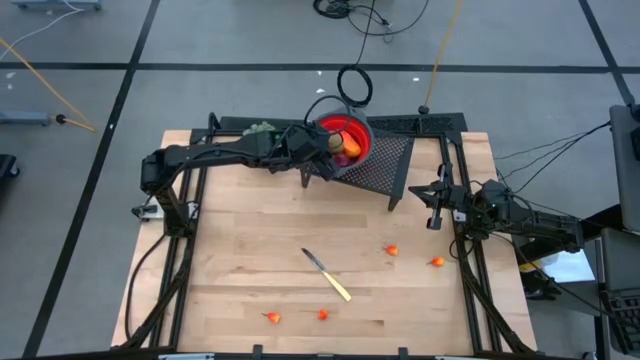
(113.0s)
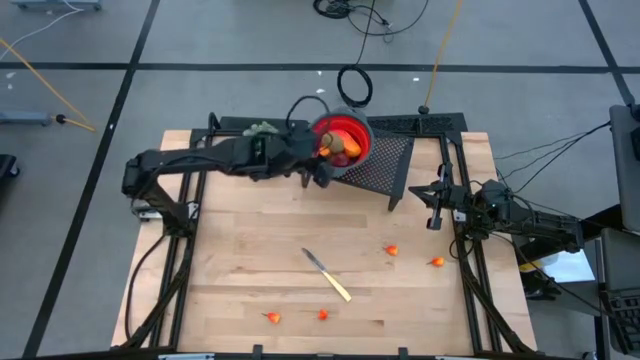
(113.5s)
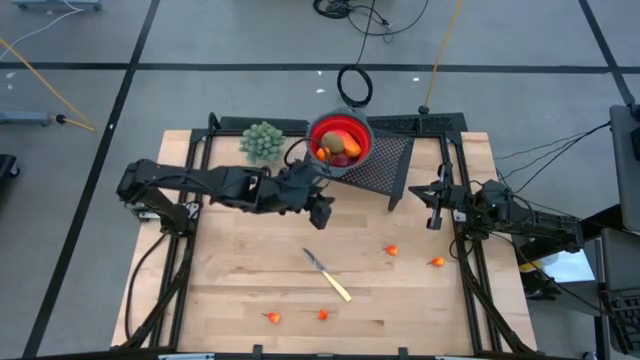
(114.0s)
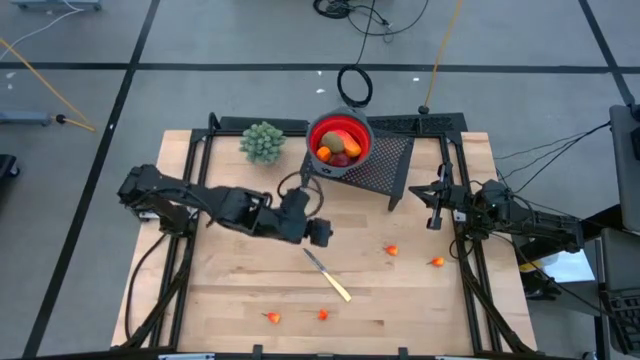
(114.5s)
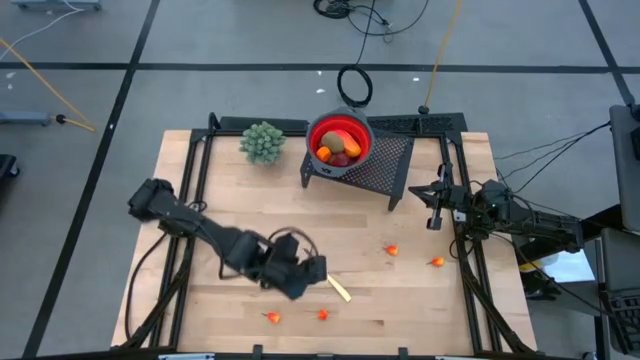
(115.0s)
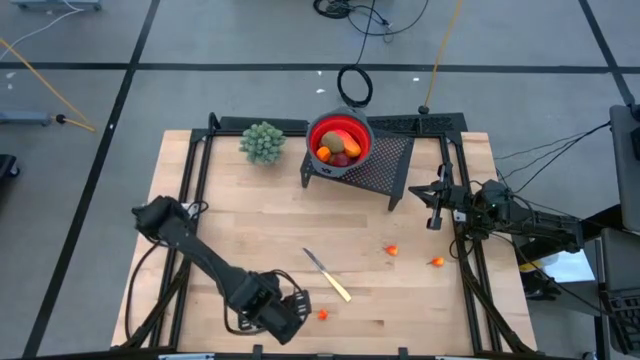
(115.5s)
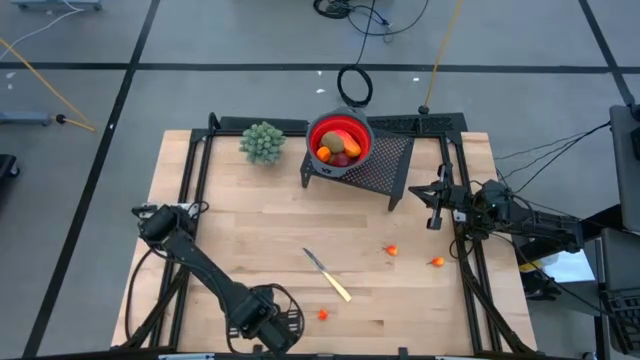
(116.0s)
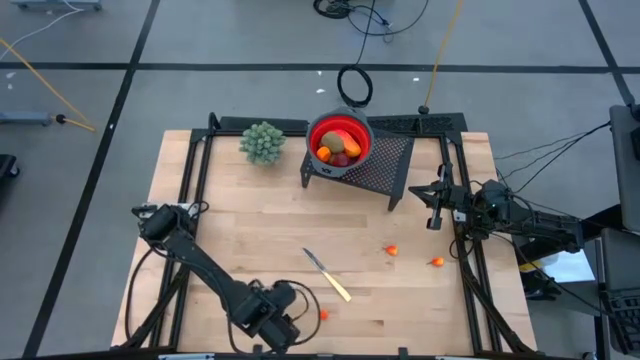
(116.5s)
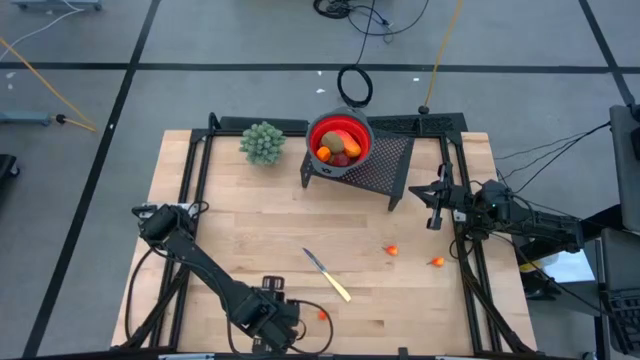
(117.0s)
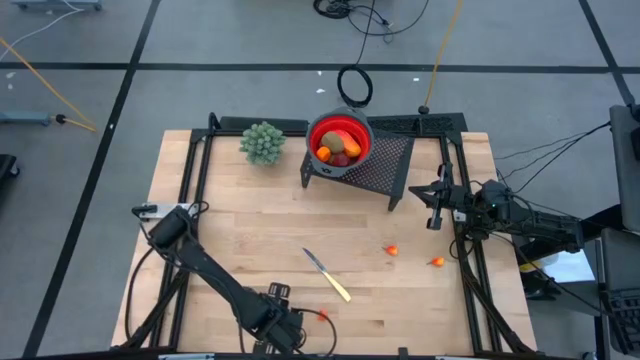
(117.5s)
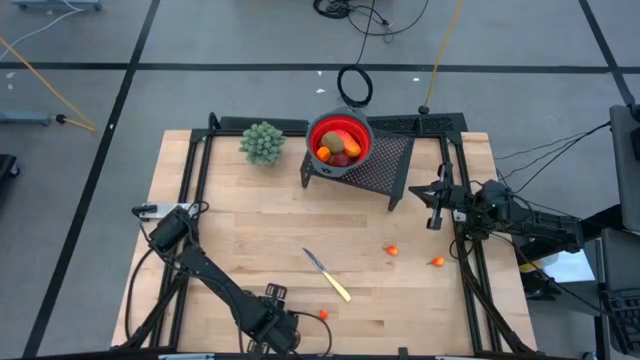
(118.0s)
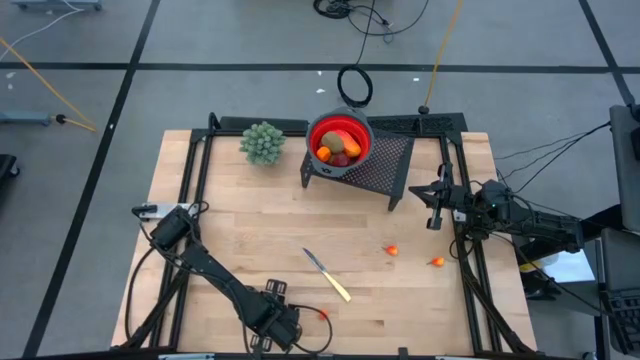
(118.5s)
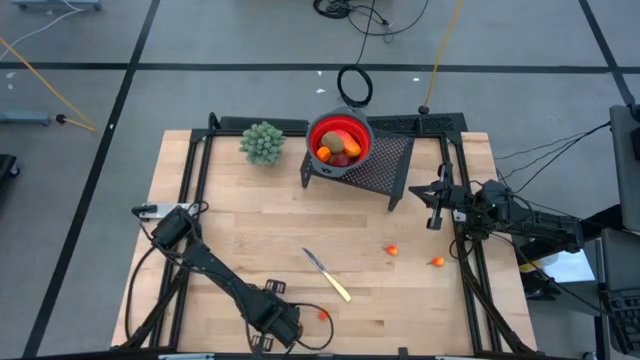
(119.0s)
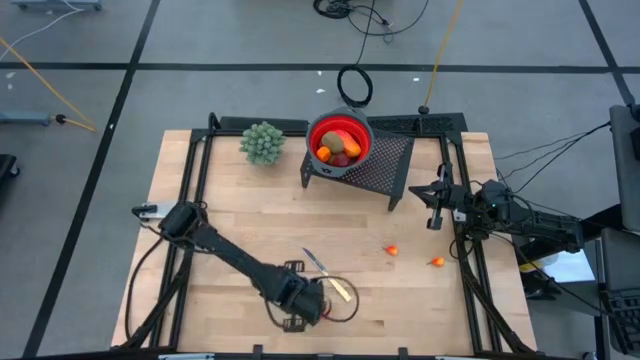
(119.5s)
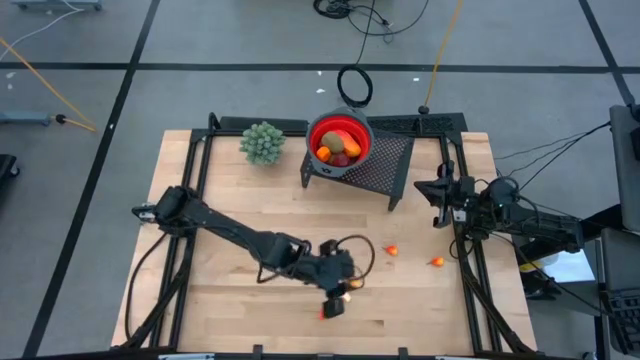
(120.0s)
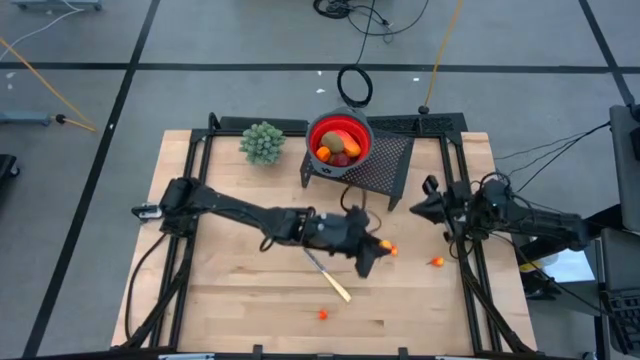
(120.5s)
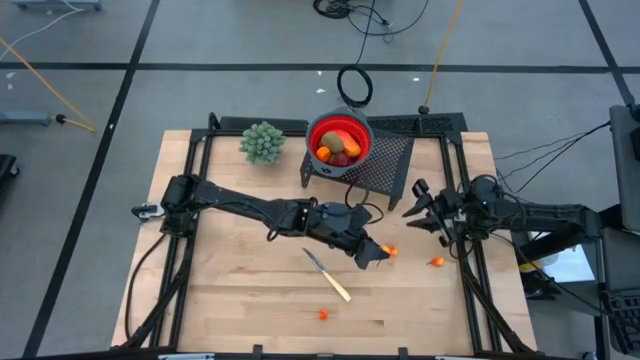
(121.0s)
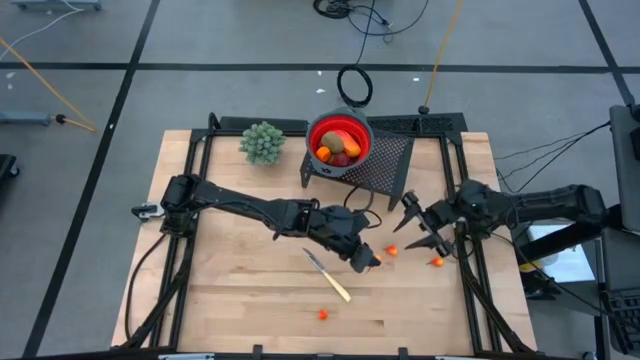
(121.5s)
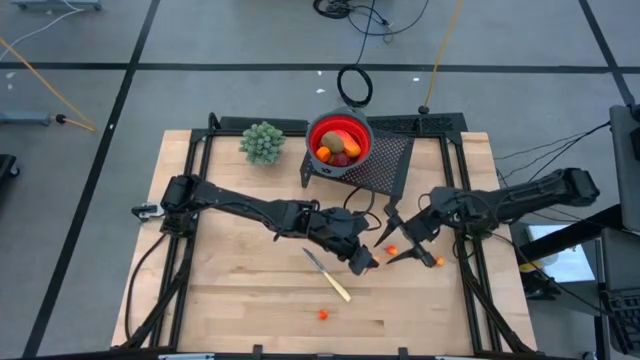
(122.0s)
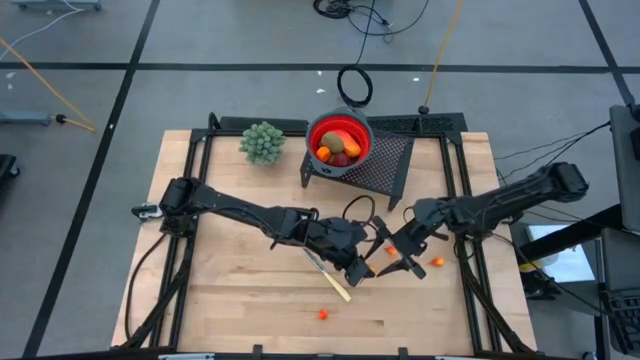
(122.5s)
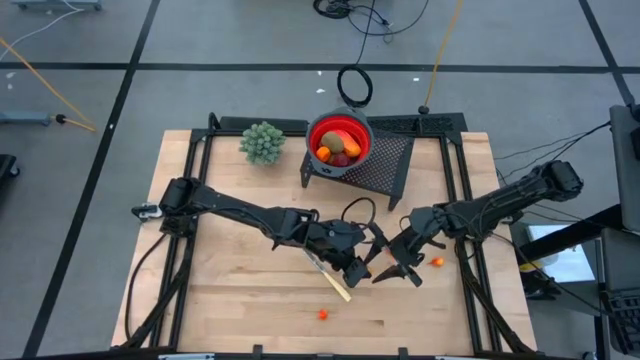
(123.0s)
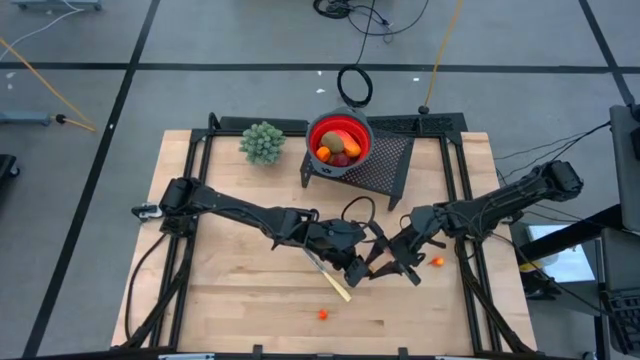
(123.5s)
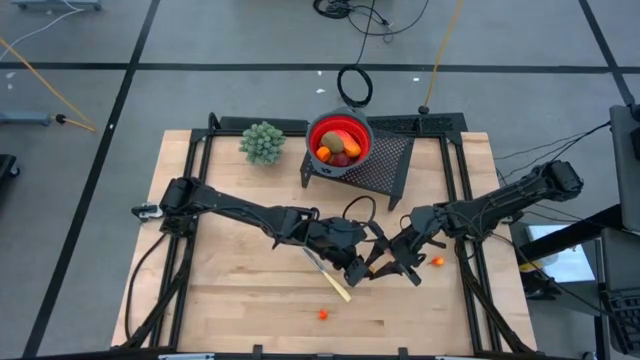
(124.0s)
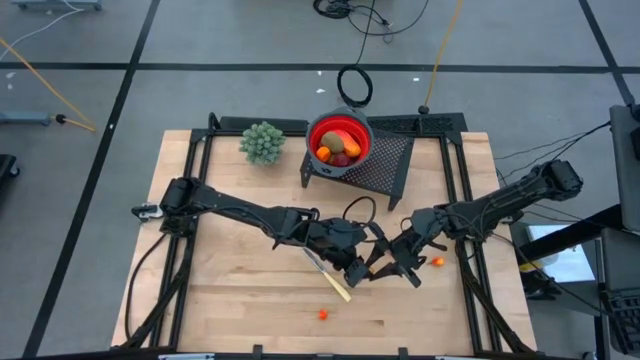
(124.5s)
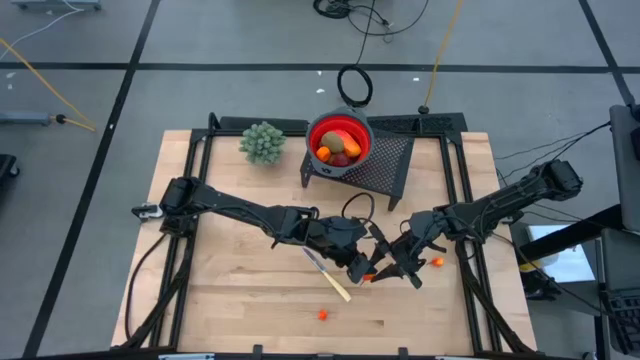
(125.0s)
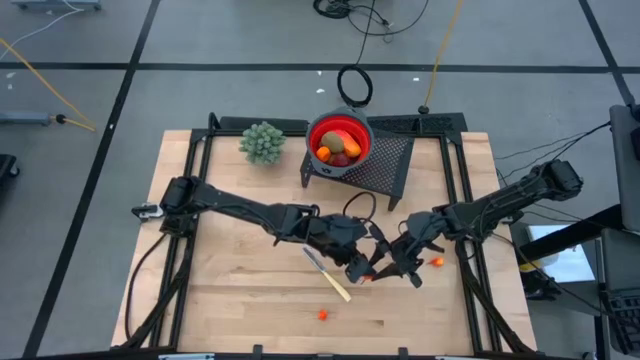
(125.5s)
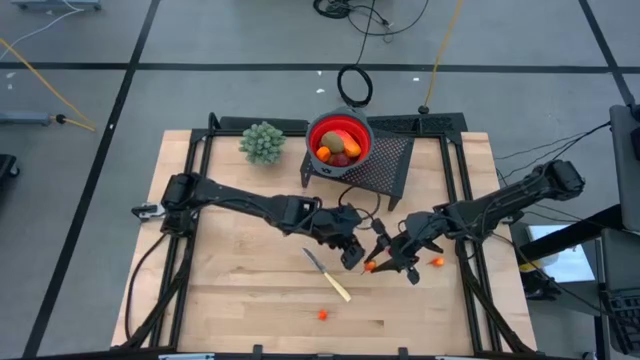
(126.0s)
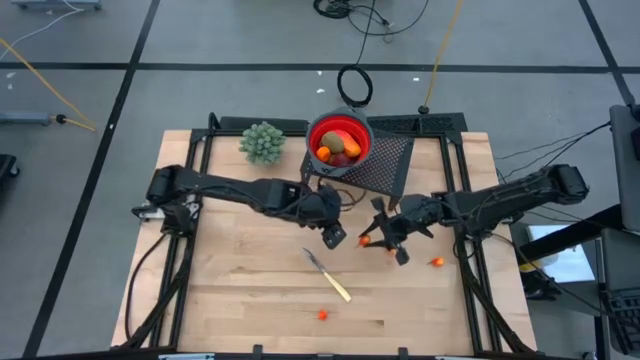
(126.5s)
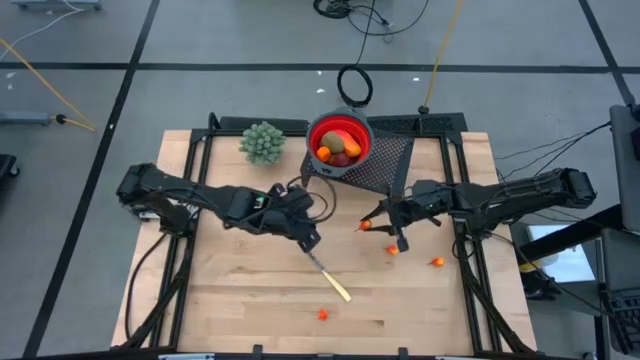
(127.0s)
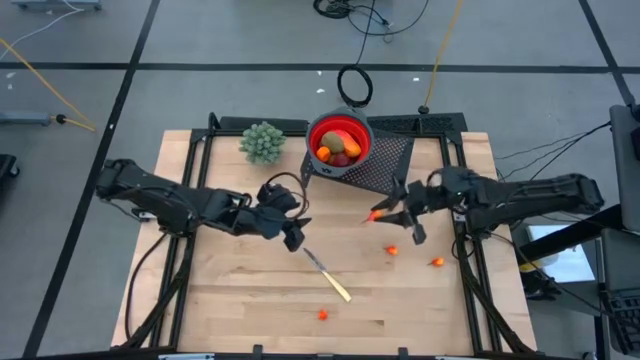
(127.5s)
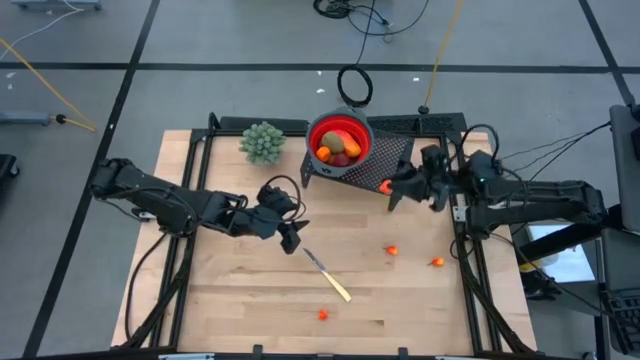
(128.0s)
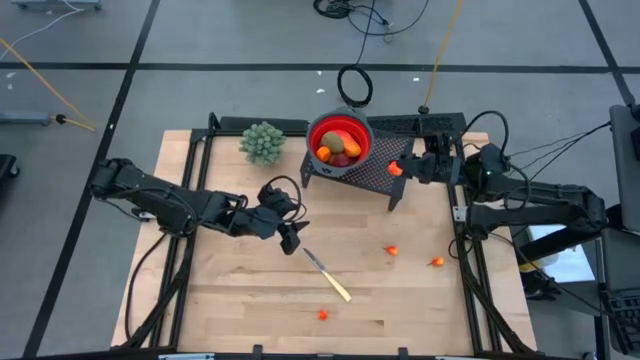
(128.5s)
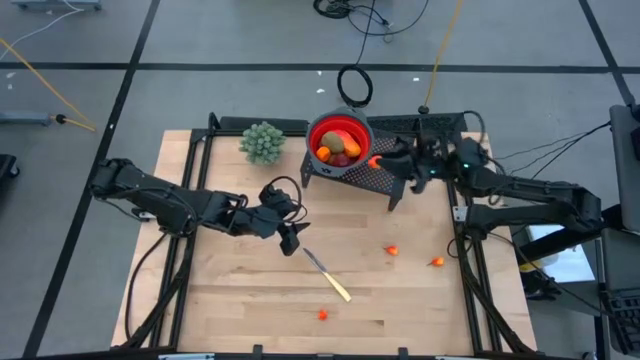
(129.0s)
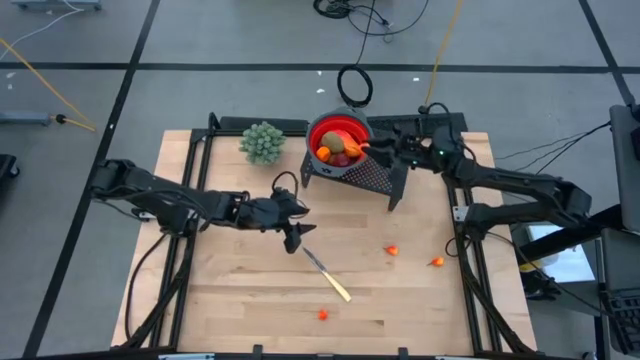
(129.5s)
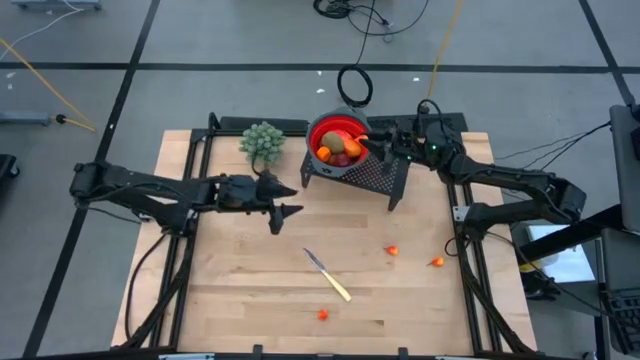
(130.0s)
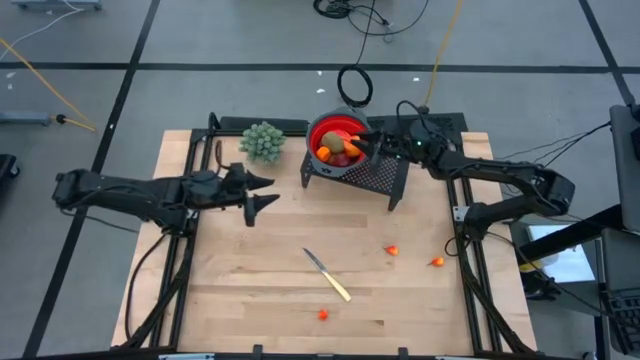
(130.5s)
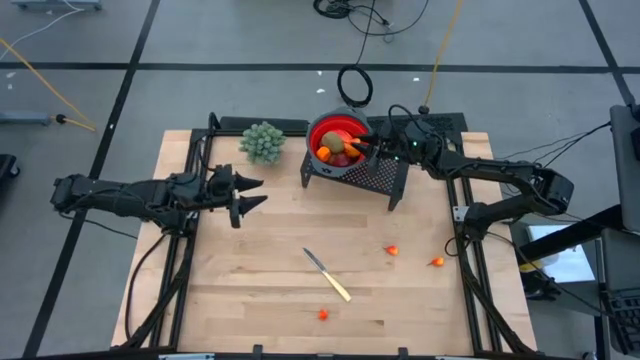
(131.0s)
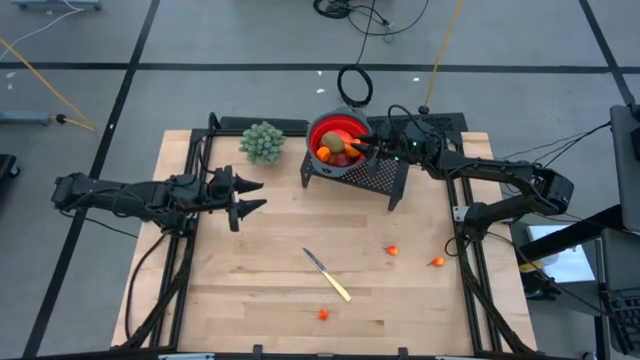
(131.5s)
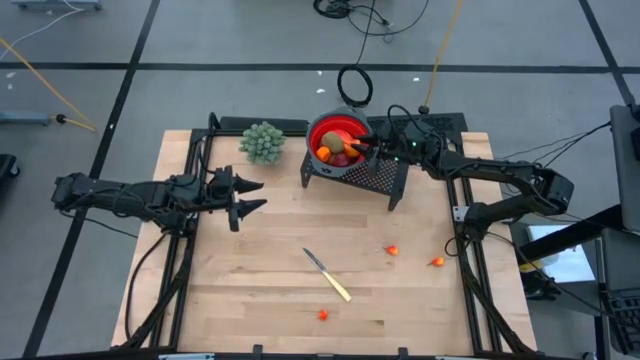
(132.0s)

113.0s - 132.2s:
Task: Pick & Place Fruit
Put the yellow pear into the red strainer bowl on the shelf

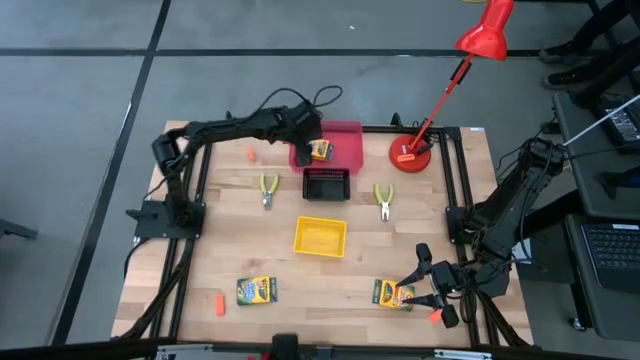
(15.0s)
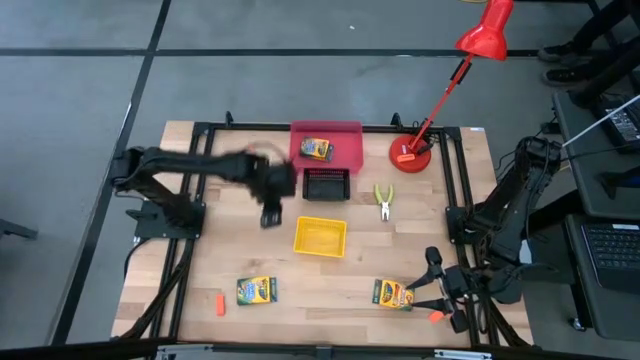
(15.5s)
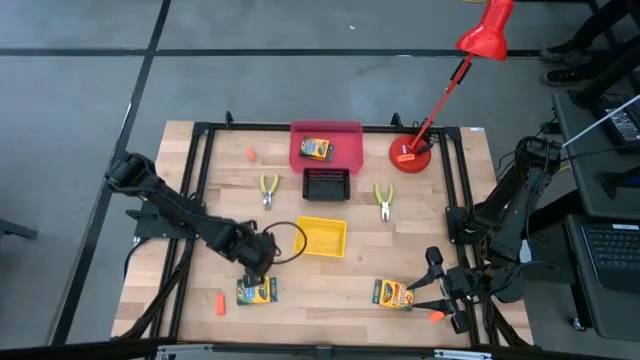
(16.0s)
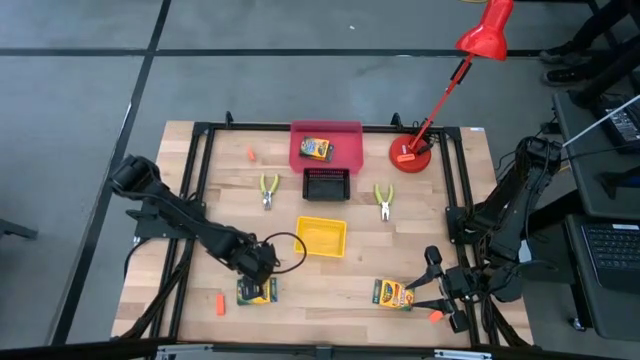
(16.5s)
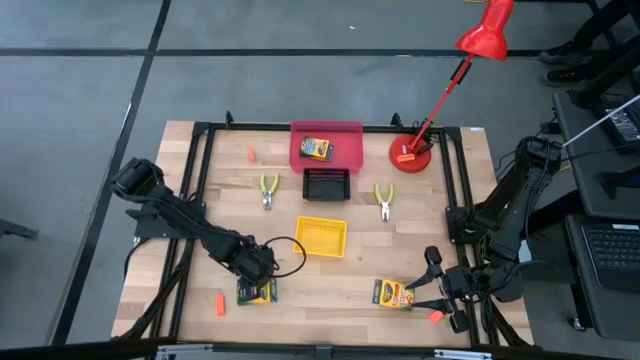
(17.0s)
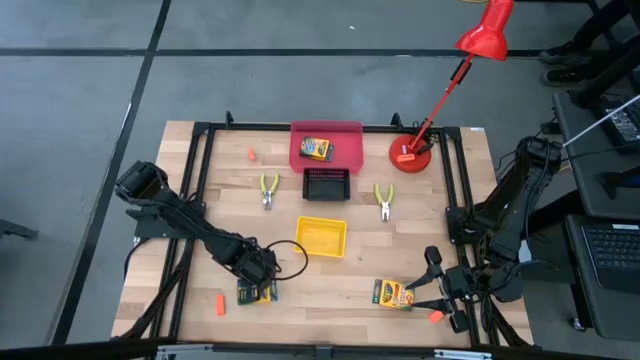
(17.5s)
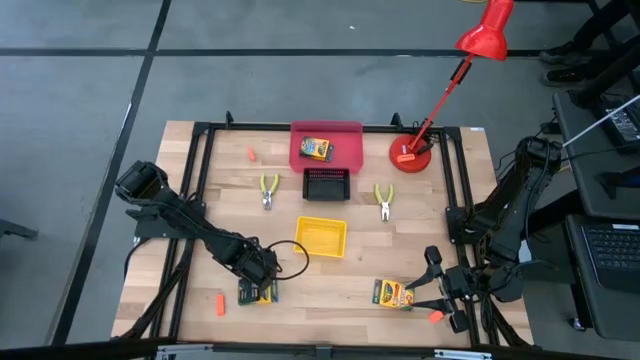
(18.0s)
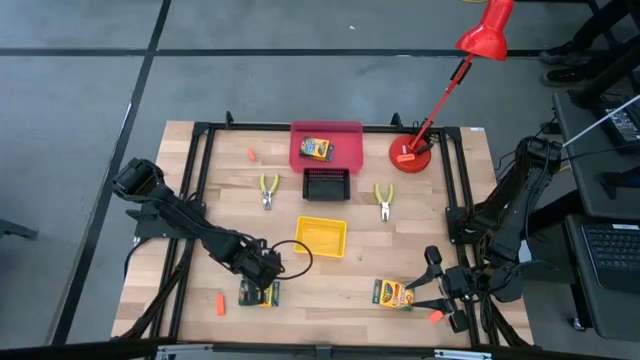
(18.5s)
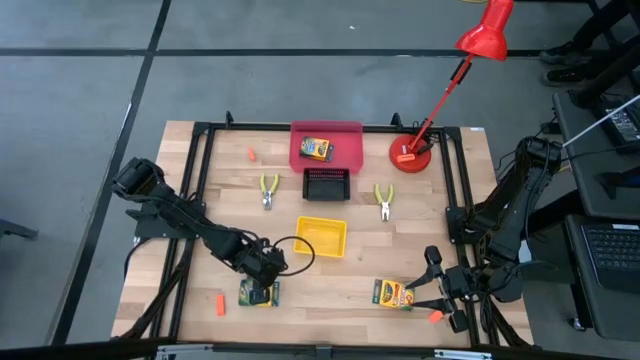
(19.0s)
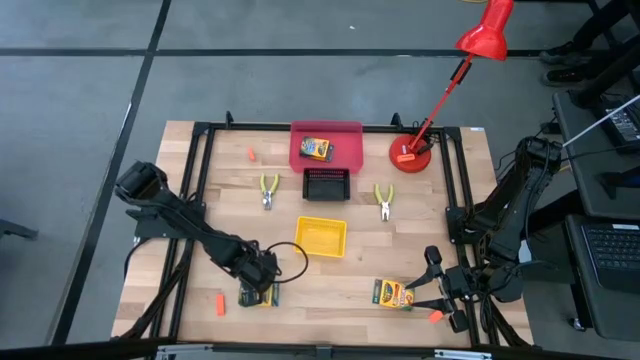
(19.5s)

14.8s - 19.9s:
Task: Pick & Place School Supplies
Put the yellow crayon box into the red bin
